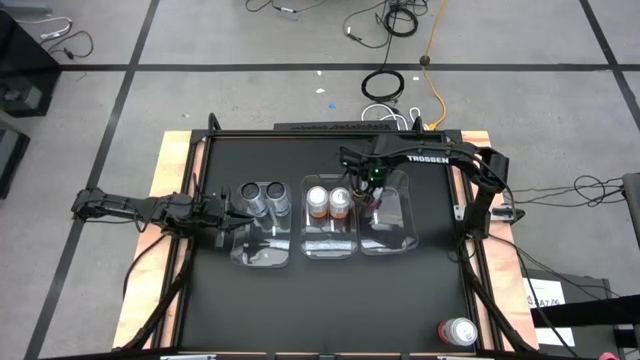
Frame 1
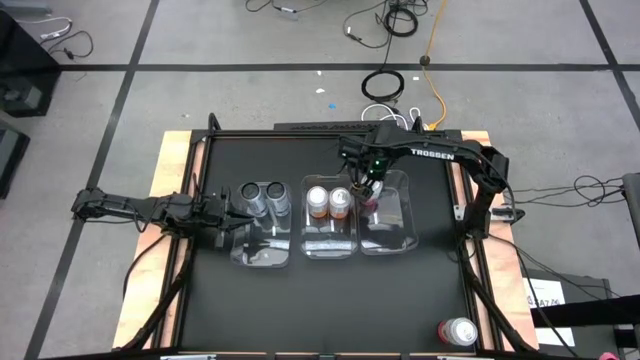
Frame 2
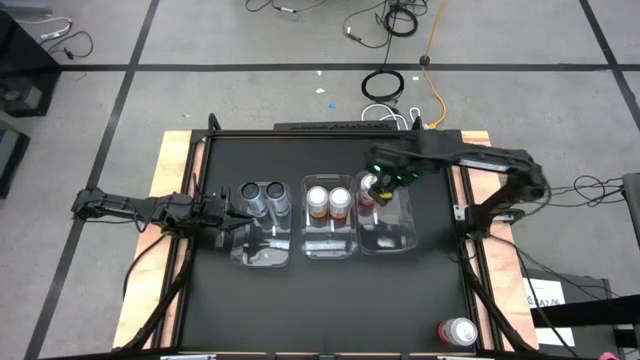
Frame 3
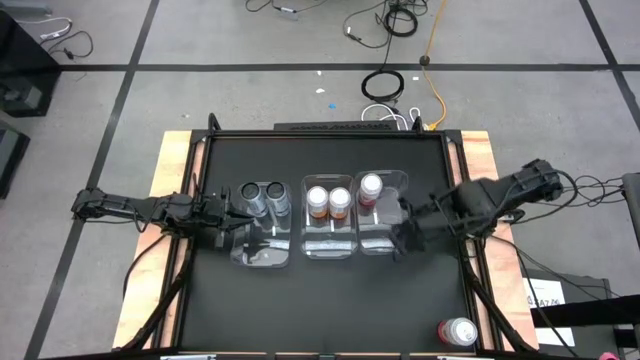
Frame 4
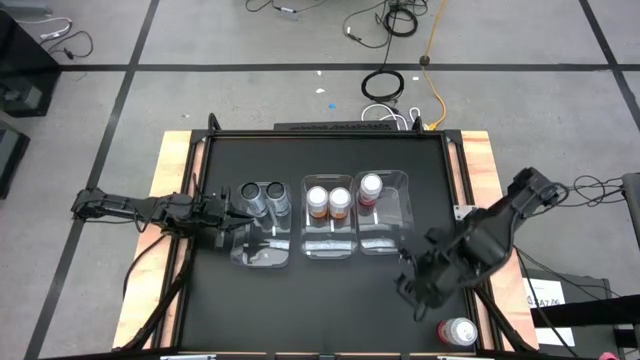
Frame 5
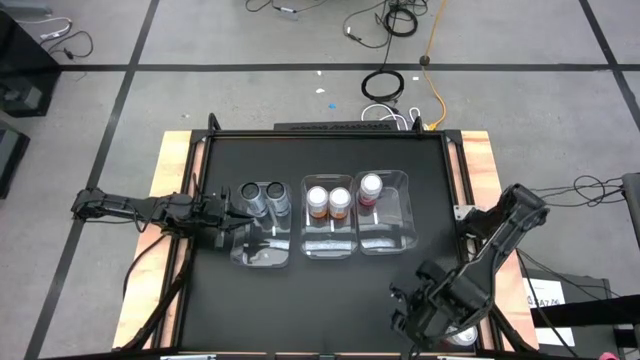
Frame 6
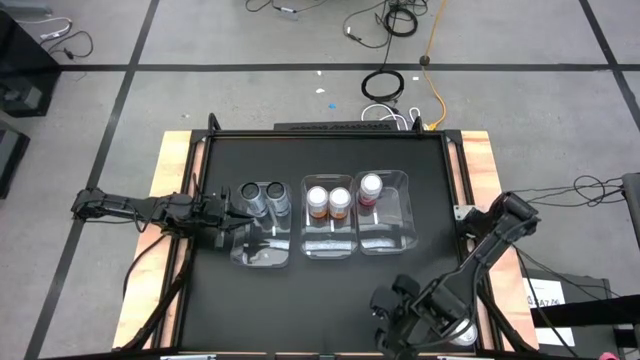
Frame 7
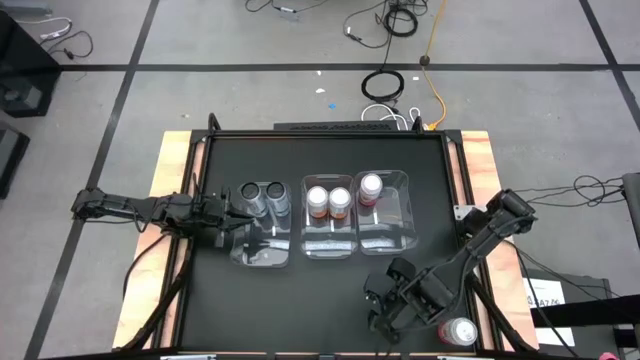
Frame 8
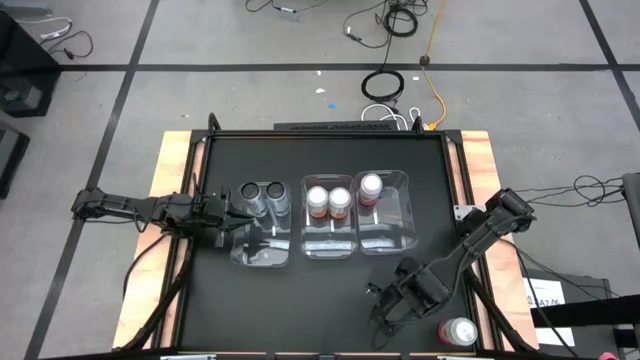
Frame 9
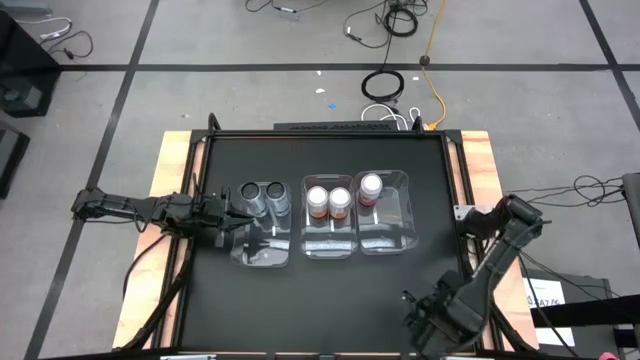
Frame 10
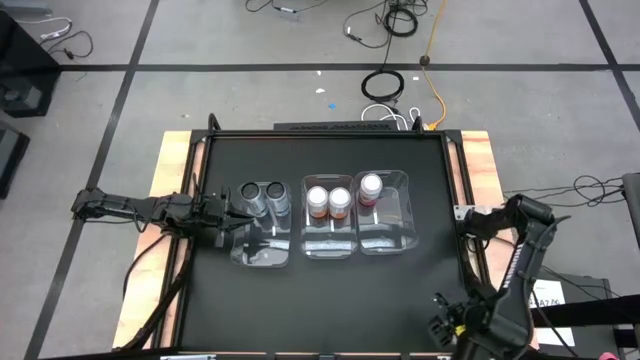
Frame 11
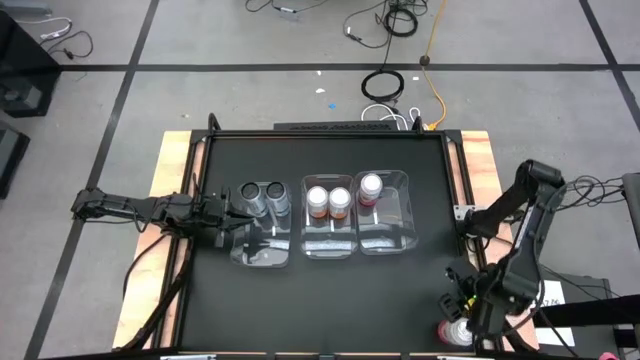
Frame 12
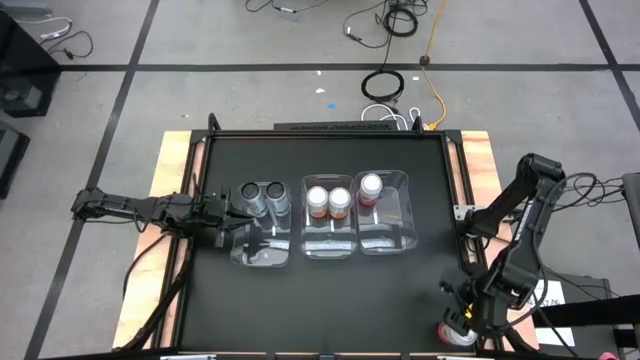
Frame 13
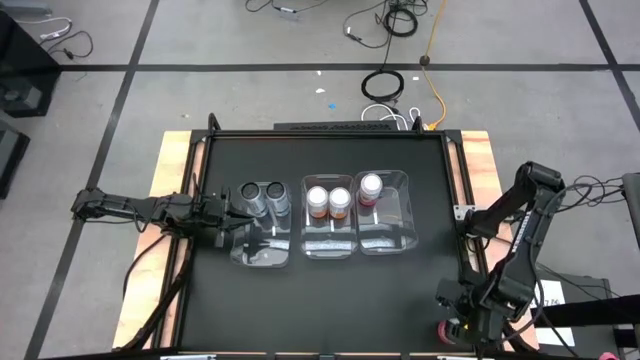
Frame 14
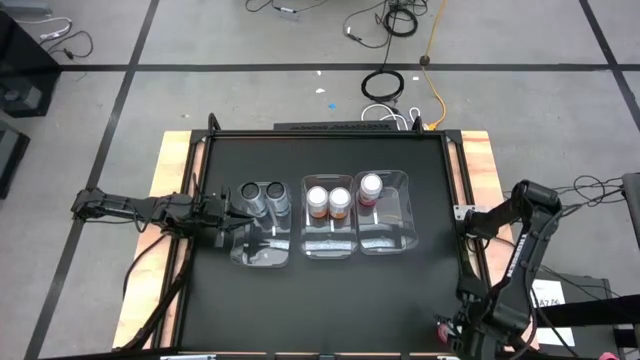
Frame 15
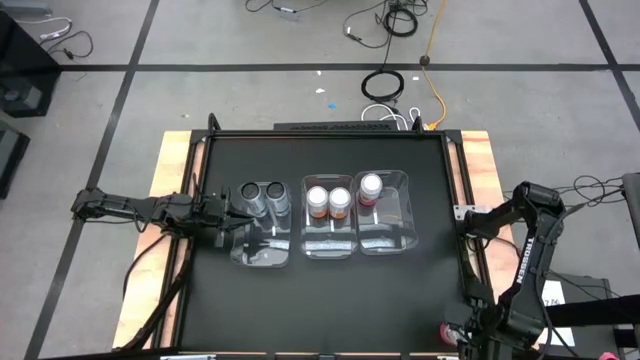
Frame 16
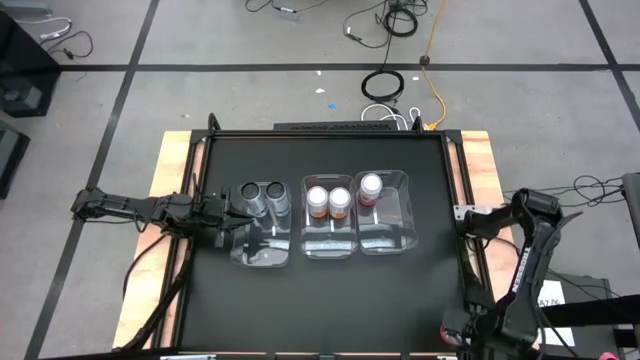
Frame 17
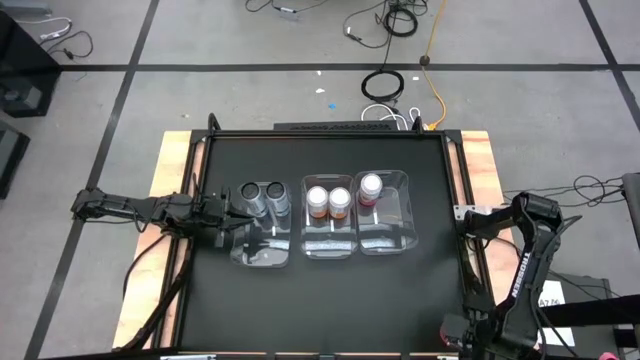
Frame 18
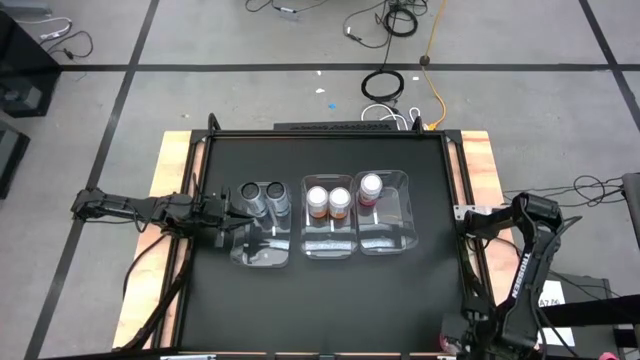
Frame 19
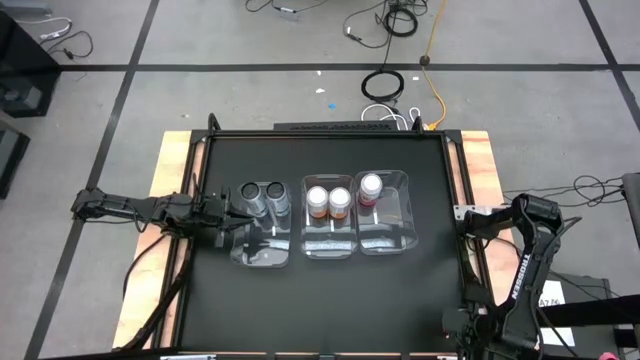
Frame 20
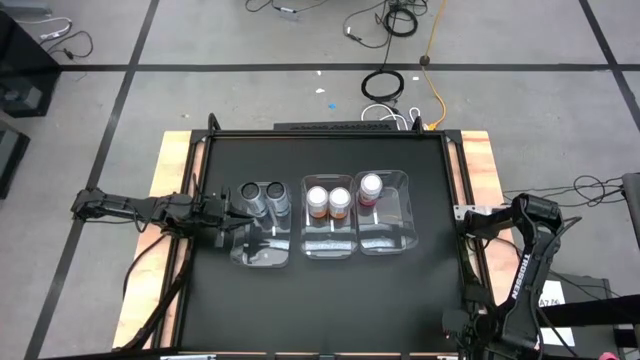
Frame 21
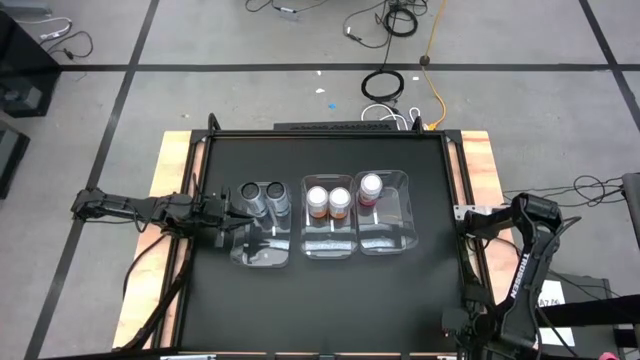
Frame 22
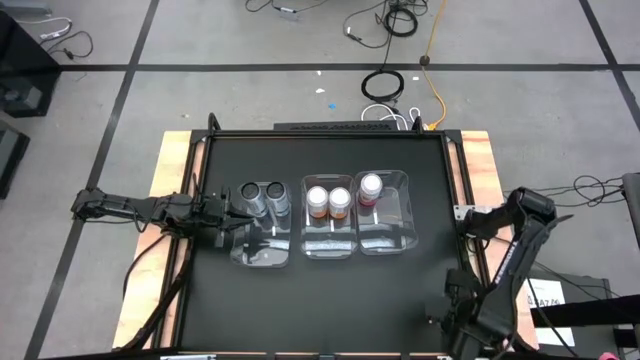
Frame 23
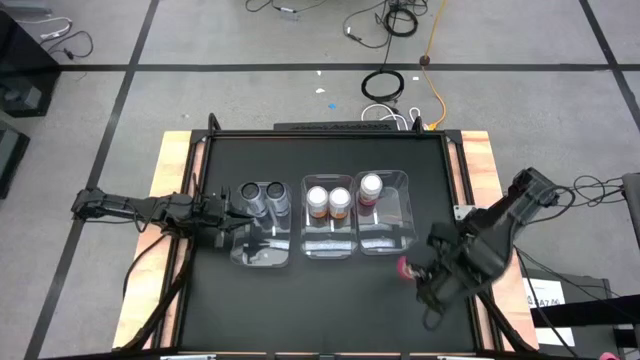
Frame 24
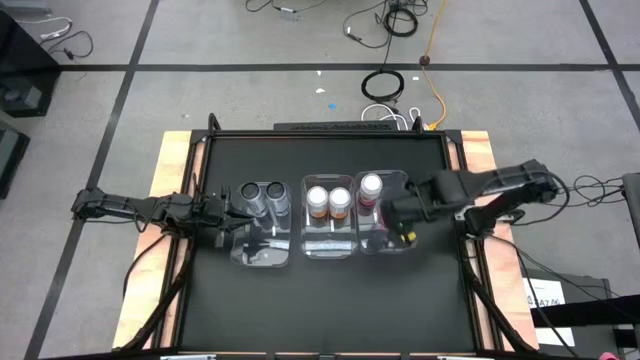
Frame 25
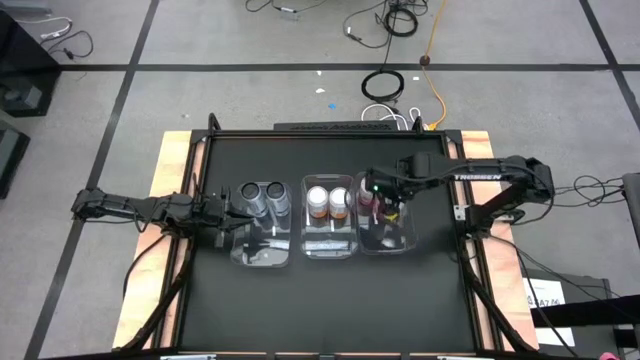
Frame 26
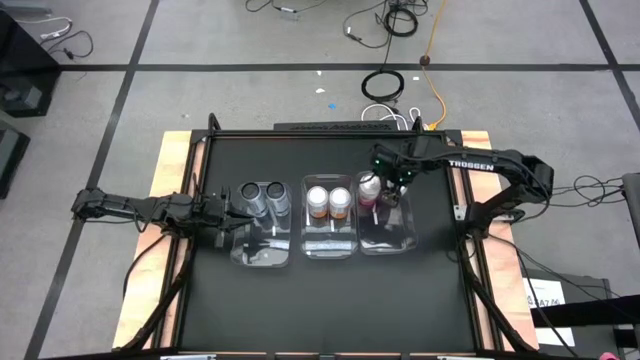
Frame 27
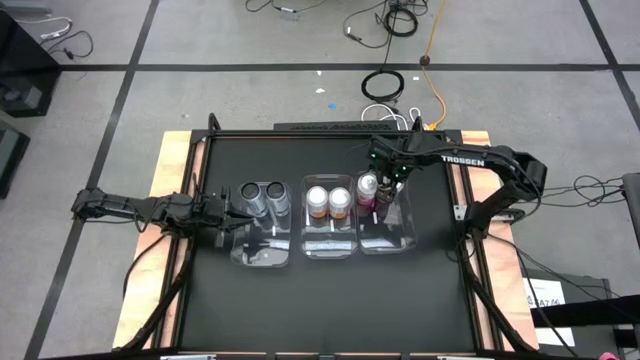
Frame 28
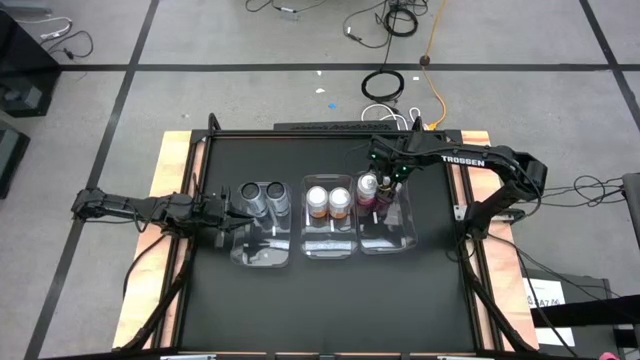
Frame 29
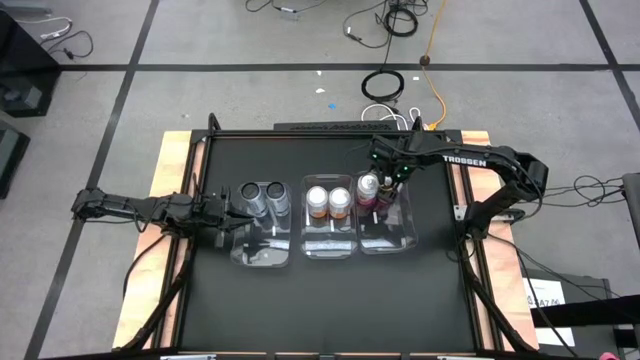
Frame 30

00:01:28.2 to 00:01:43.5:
Task: Sort soda cans
Put the pink soda can into the right transparent bin

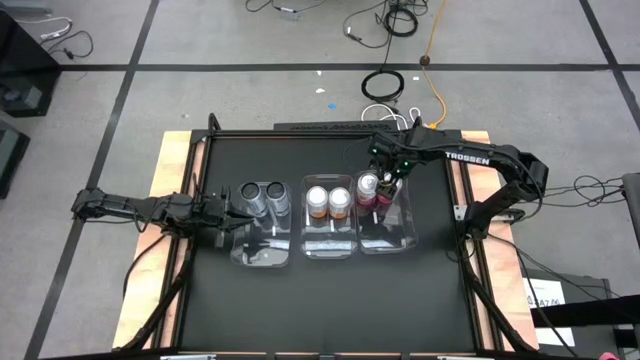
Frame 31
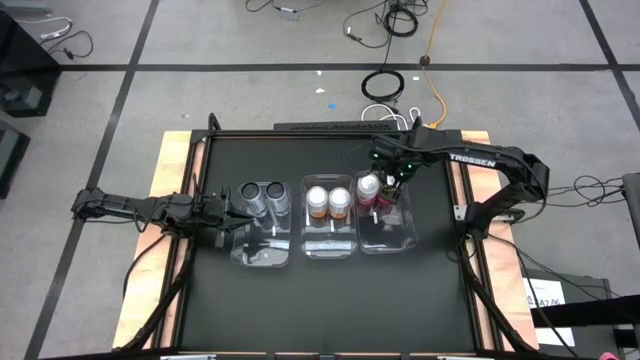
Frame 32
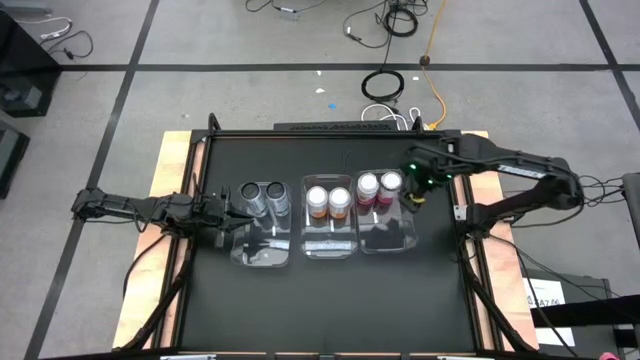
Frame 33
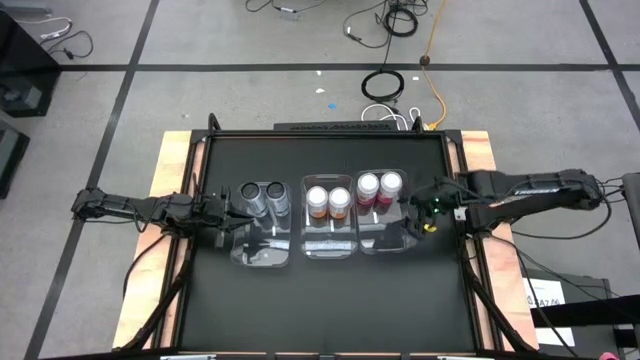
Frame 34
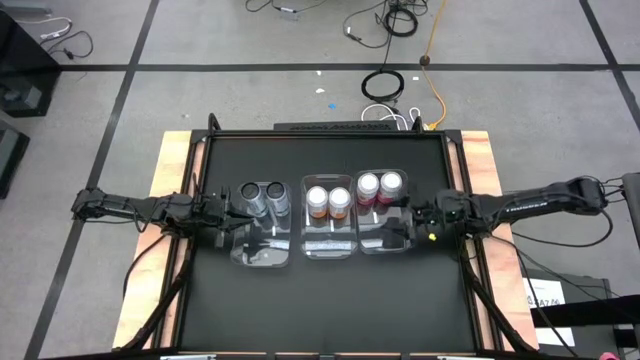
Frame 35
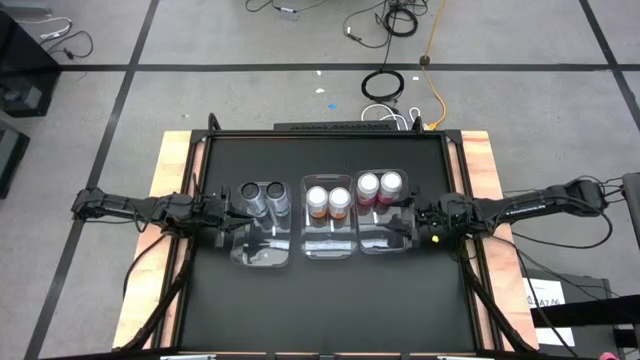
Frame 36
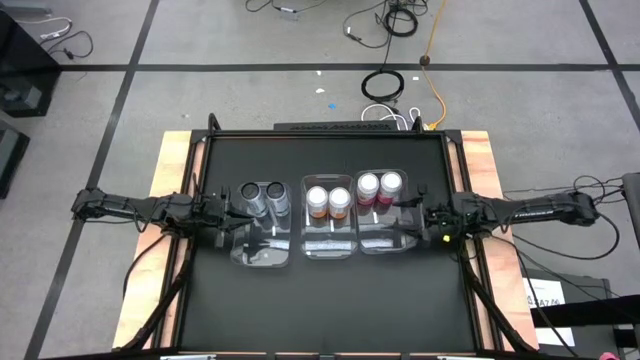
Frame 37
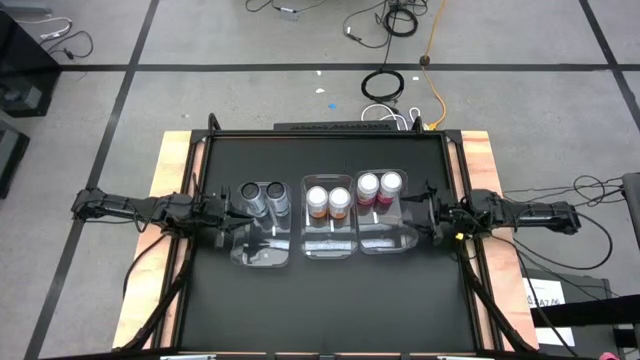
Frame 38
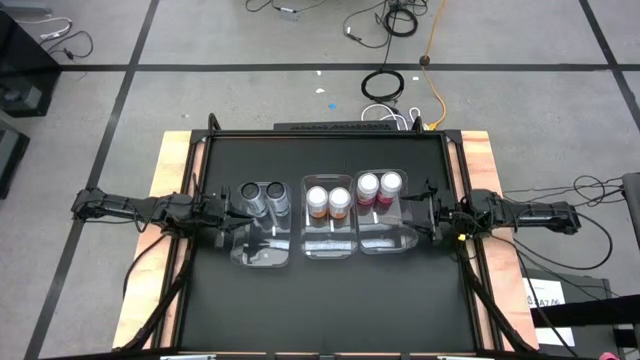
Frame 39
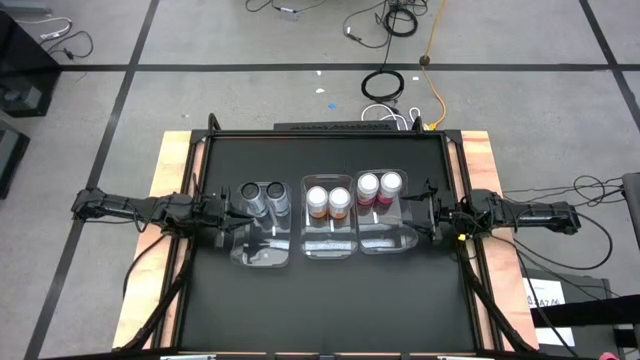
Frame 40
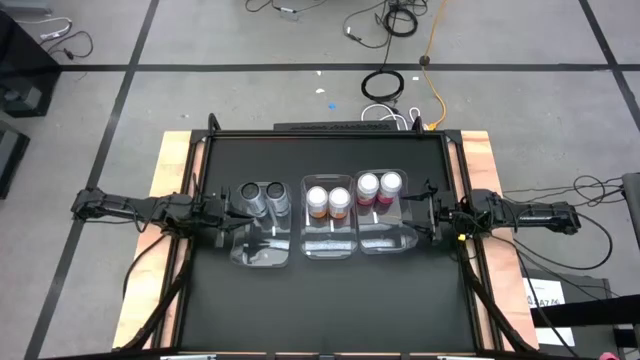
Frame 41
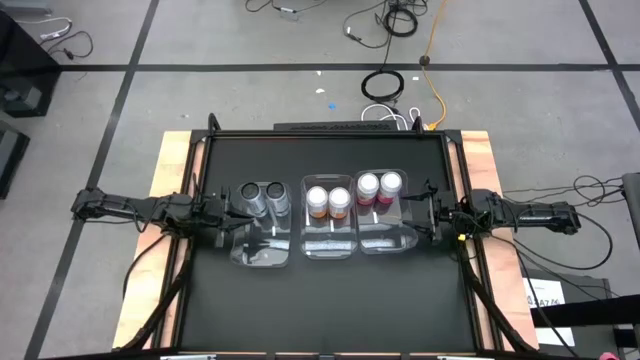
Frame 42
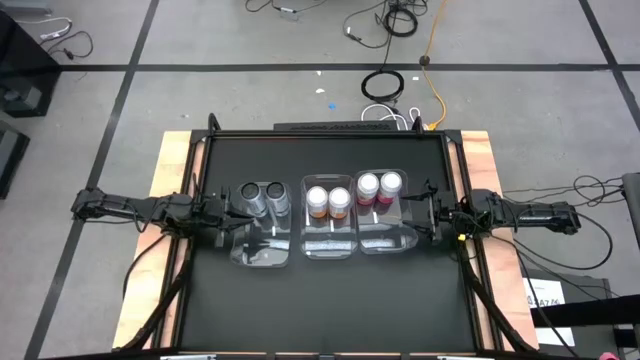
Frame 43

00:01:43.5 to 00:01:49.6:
Return to Home Position
